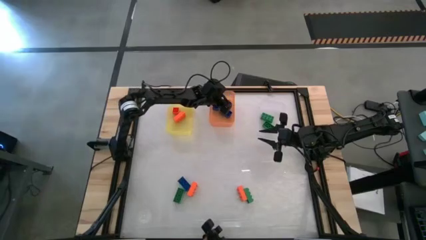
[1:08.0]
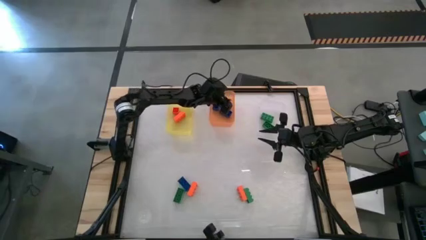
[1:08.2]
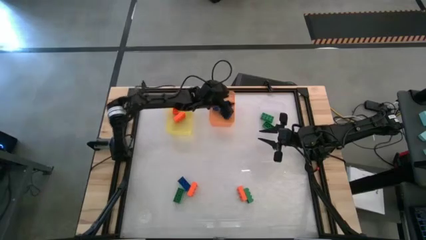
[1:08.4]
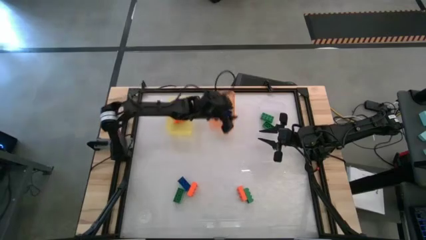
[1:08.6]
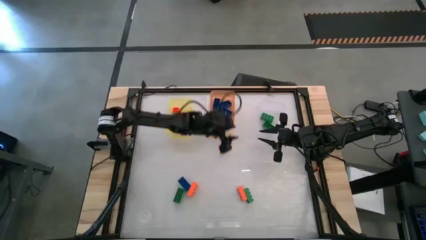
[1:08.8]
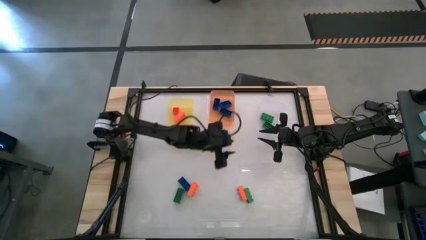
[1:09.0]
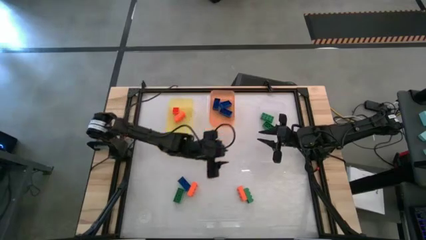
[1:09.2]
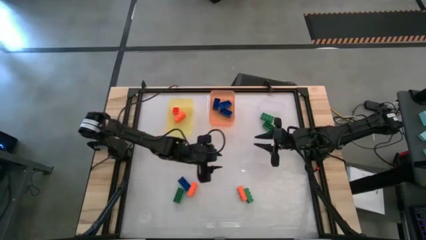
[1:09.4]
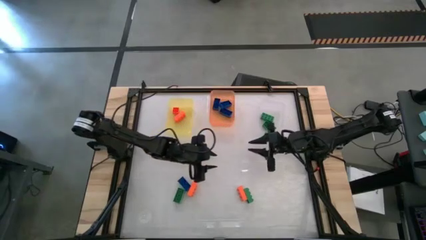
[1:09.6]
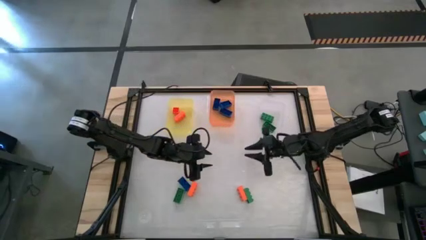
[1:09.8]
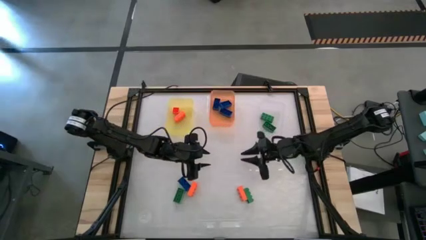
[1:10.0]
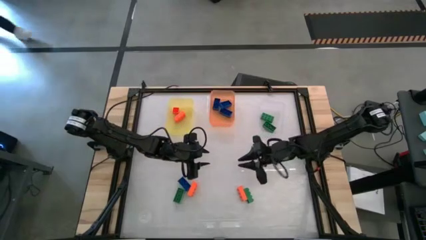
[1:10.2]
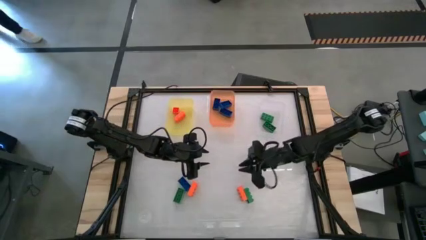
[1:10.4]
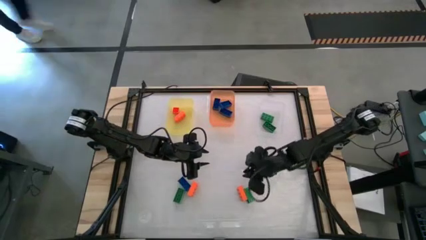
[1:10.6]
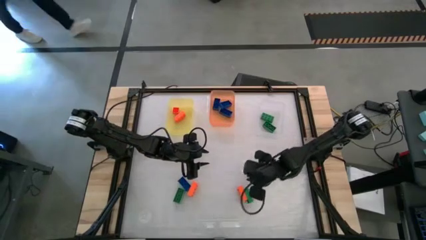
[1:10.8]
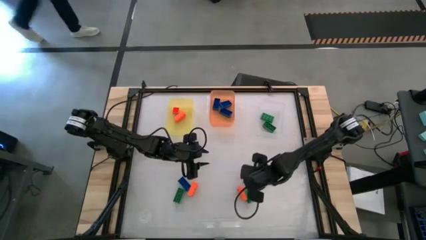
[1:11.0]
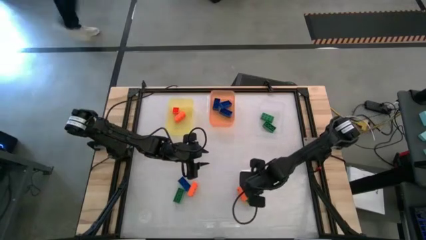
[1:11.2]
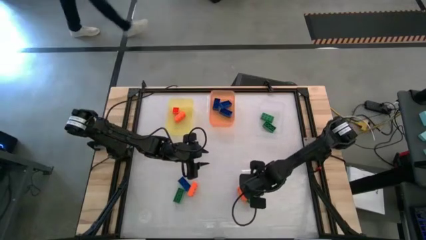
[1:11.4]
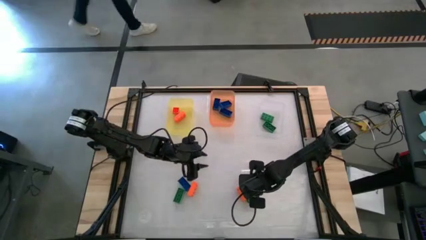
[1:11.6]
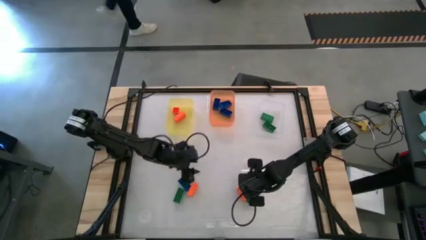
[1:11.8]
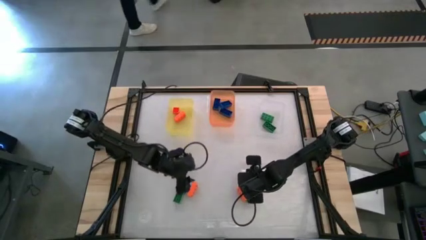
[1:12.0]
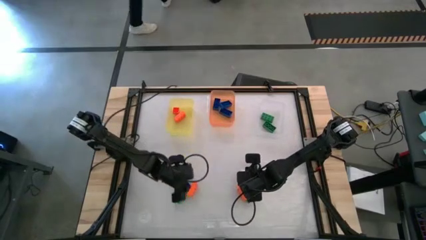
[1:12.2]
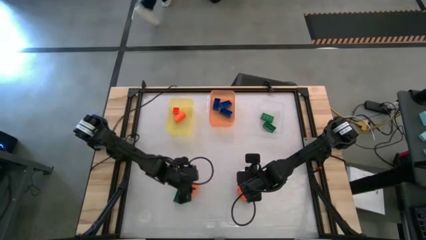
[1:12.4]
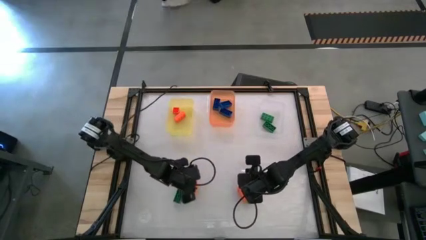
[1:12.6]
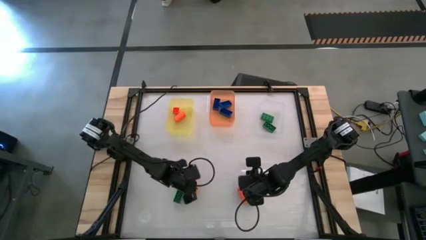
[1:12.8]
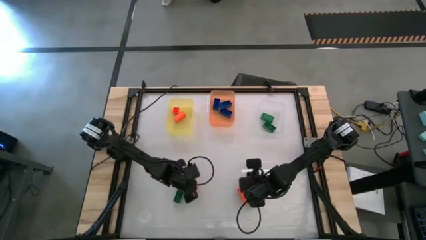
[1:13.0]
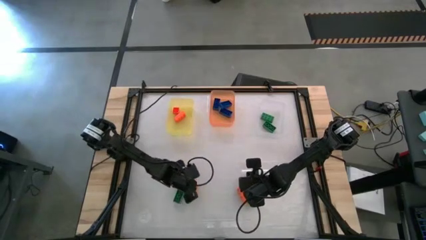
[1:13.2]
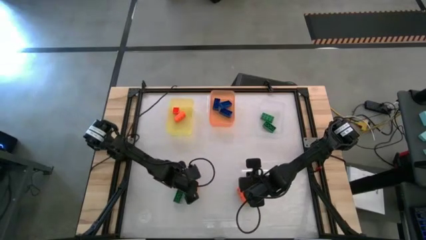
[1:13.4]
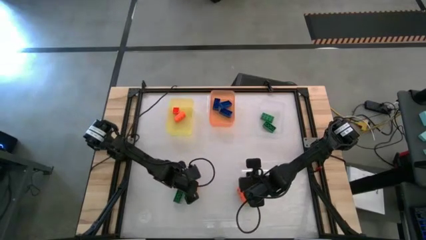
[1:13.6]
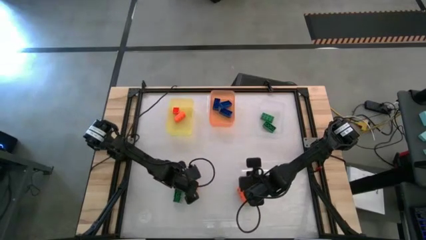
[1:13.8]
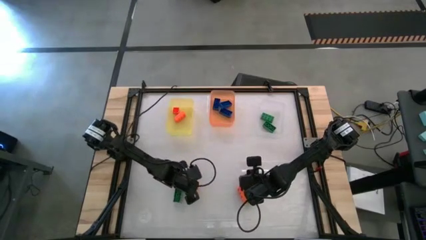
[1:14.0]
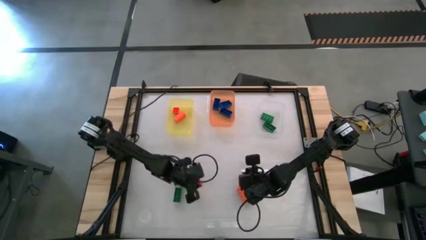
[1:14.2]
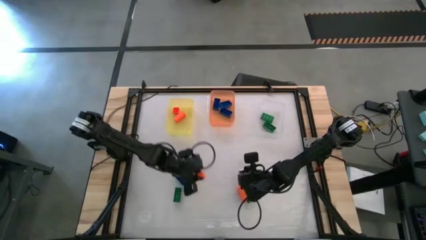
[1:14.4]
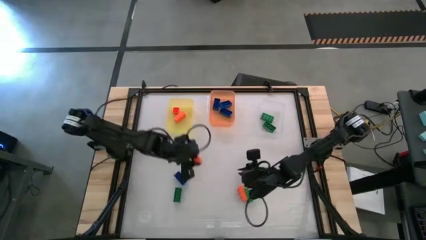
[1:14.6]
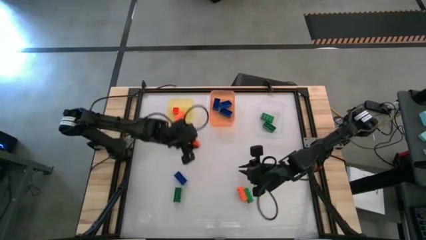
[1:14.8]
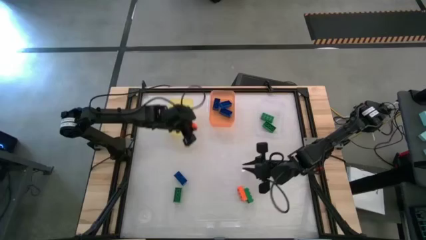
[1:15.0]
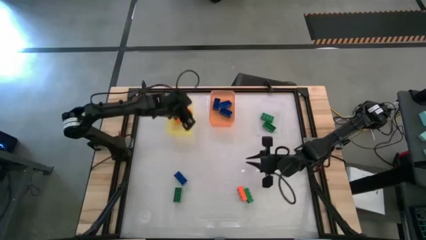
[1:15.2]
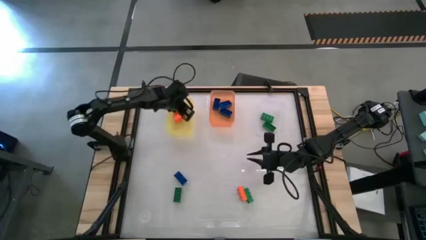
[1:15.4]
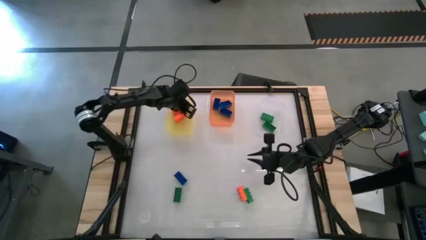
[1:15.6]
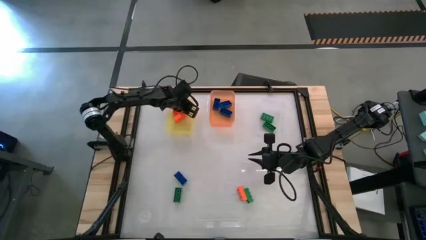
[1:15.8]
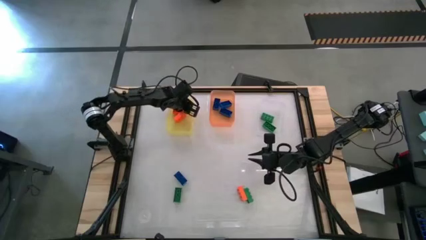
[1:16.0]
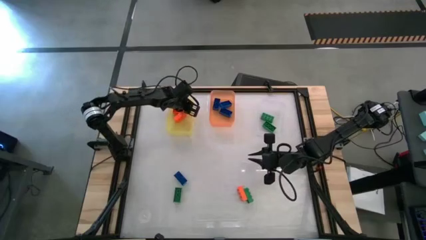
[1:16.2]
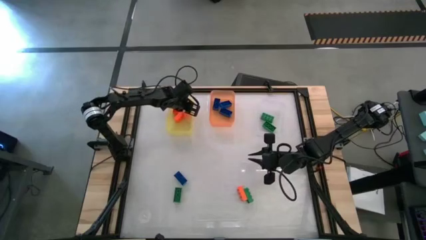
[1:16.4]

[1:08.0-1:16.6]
Task: Sort & place blocks by color
Put the orange game piece into the yellow bin

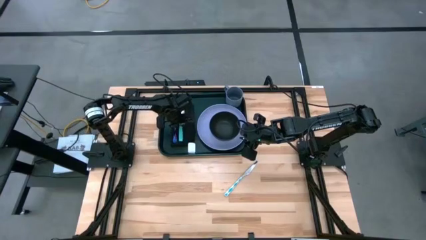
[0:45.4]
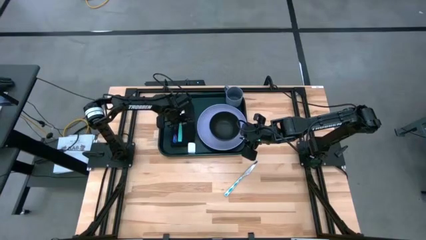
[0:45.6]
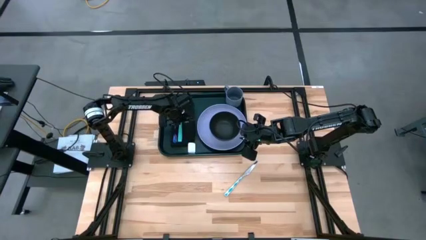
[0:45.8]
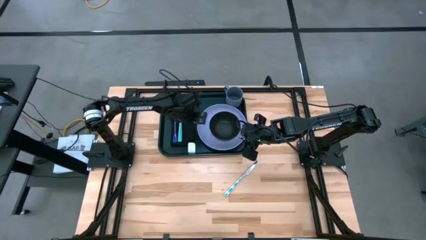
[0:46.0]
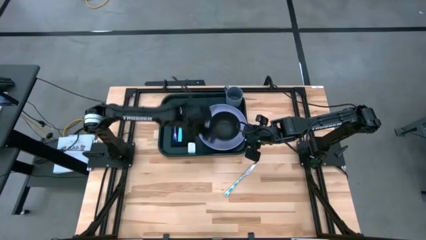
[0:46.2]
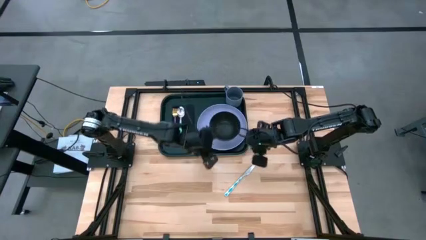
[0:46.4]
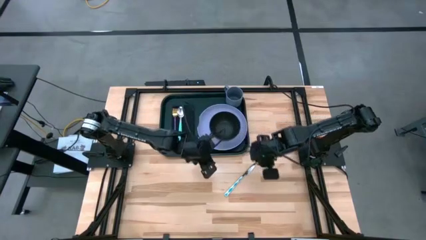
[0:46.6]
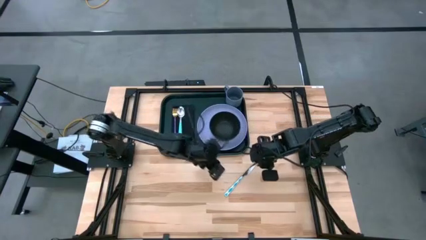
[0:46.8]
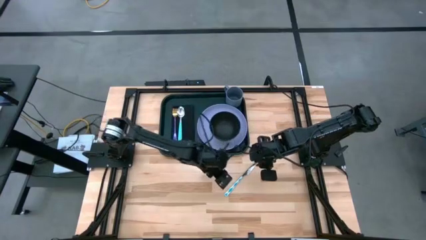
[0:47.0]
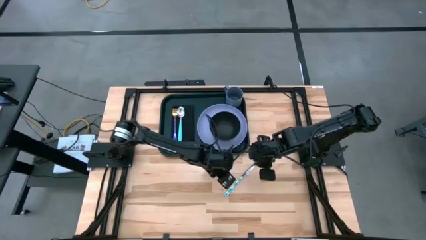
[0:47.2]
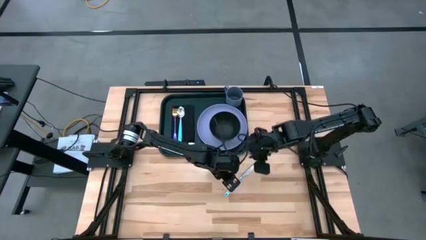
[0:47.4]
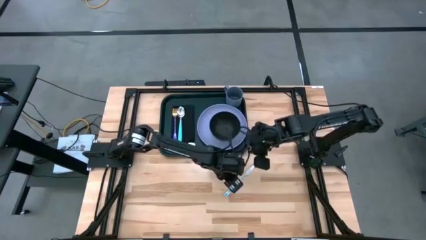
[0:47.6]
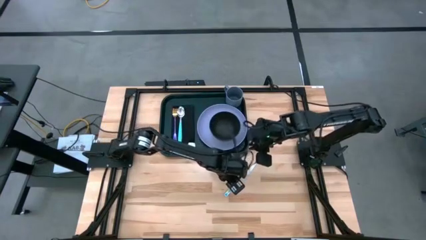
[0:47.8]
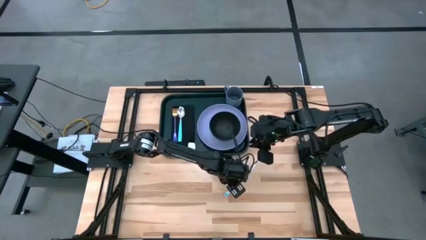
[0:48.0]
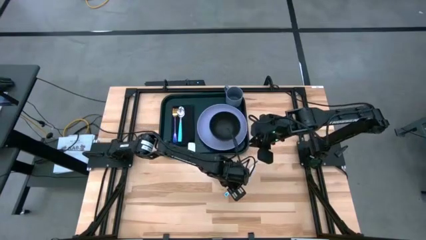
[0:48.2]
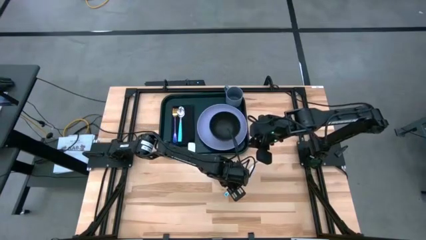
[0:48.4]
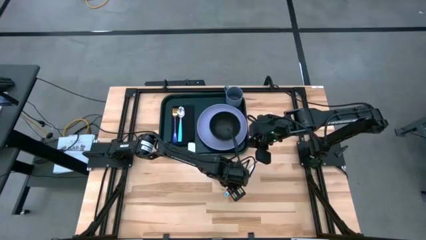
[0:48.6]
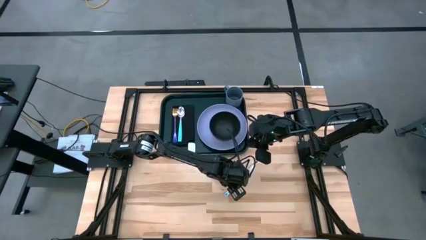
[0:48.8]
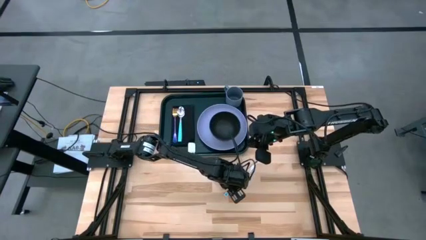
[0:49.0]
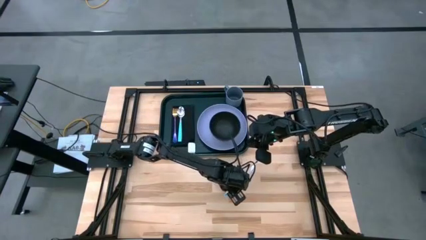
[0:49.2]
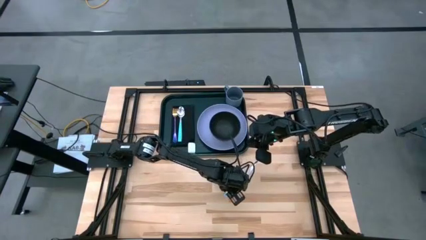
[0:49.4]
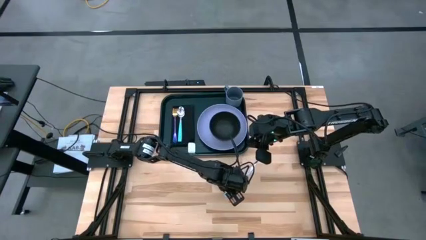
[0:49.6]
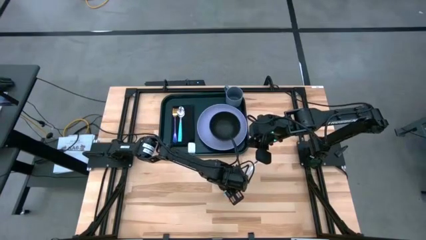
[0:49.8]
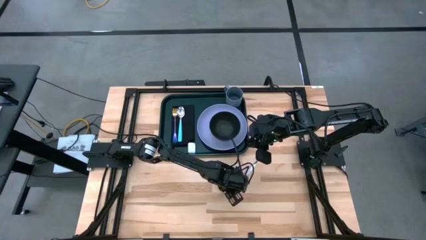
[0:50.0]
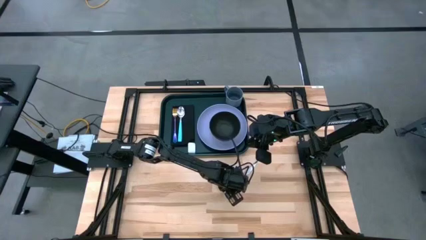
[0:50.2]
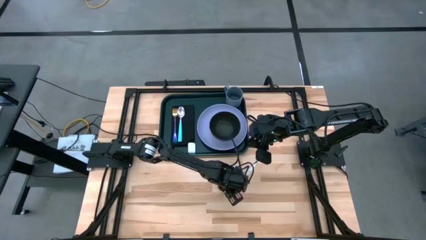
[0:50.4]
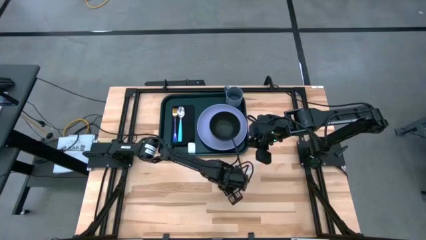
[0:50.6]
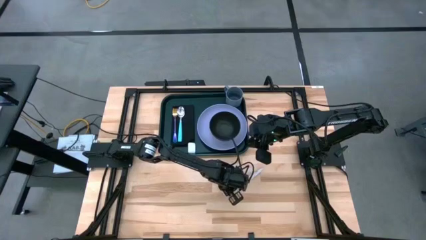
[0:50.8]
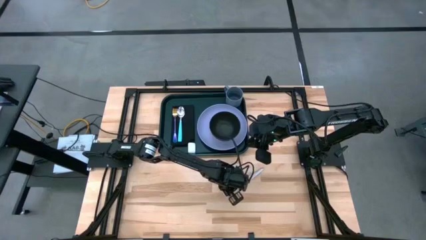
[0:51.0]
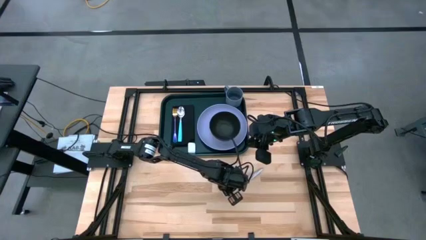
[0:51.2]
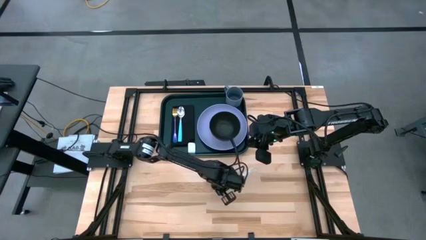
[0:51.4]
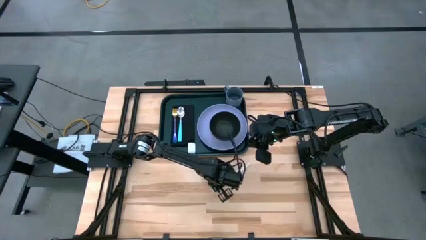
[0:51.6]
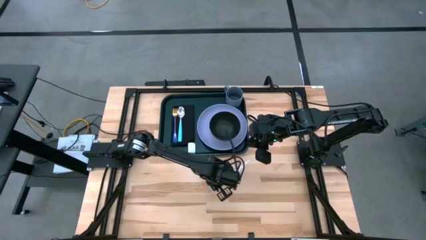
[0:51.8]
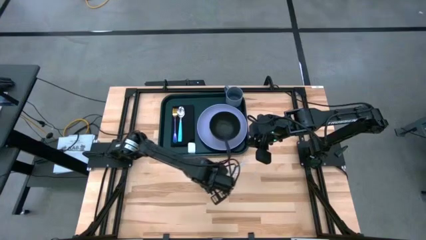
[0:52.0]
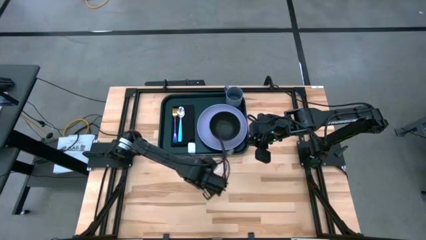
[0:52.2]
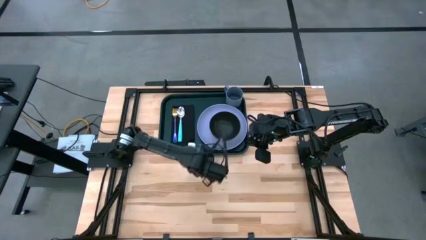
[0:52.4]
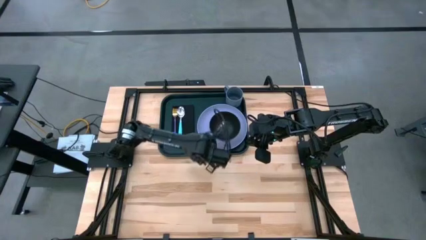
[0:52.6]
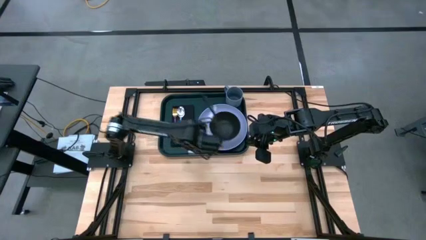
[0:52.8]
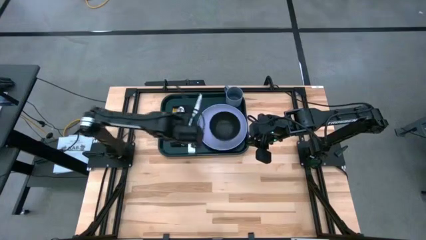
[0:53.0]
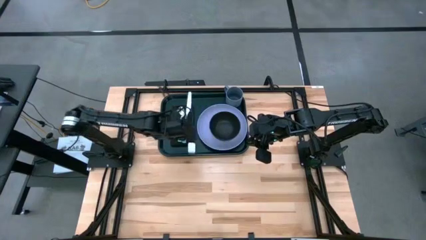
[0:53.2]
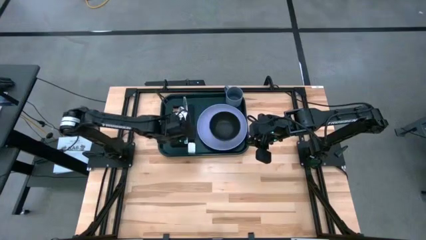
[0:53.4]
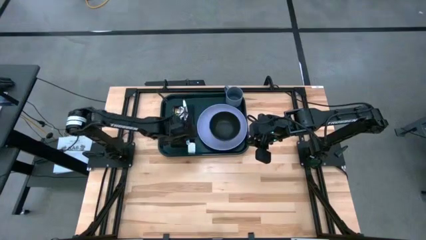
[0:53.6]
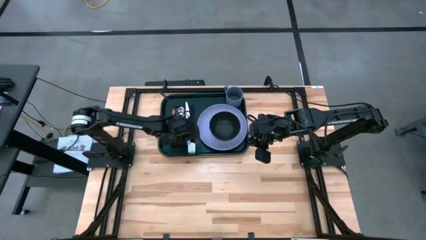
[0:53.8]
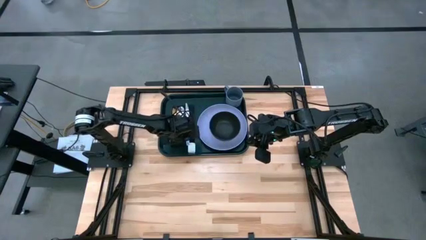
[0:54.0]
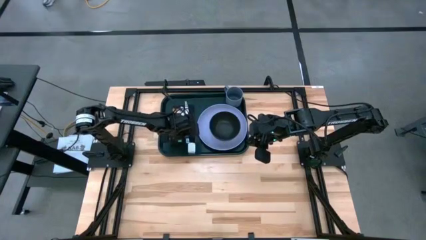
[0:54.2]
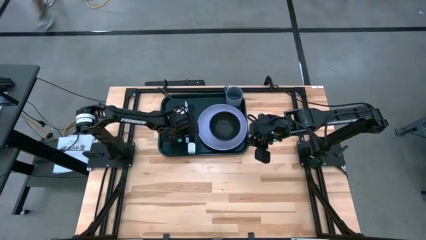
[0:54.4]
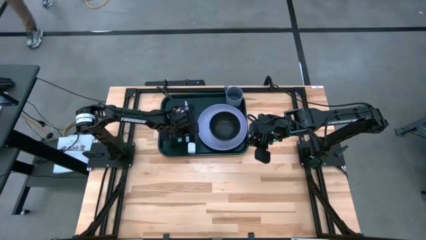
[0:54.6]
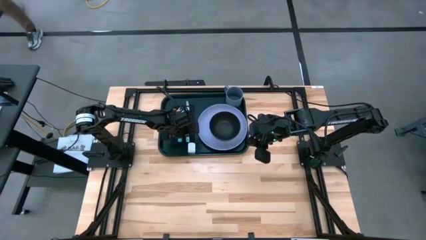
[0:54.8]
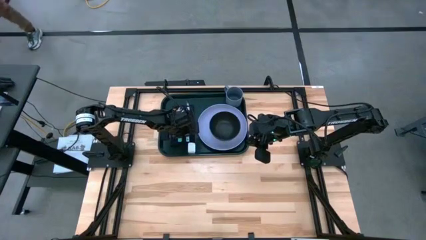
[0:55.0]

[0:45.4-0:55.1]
Task: Set up tray
Put the knife on the napkin beside the spoon on the serving tray
